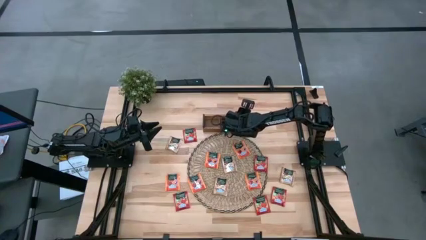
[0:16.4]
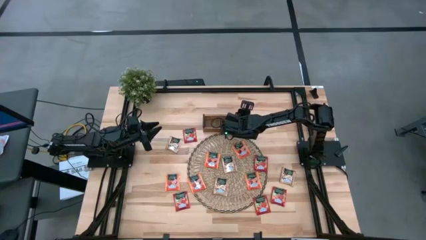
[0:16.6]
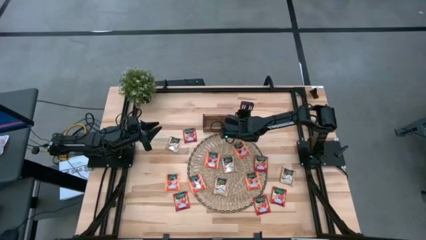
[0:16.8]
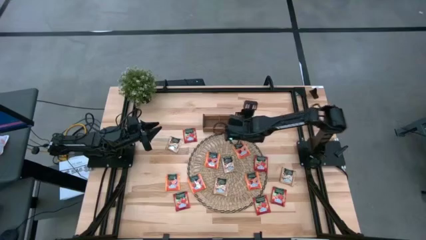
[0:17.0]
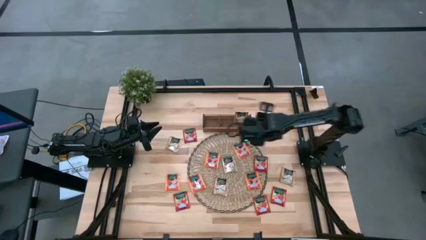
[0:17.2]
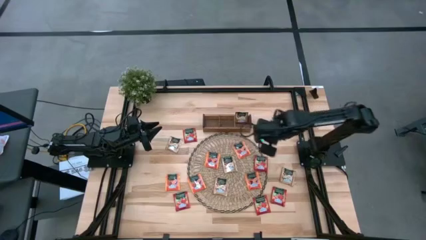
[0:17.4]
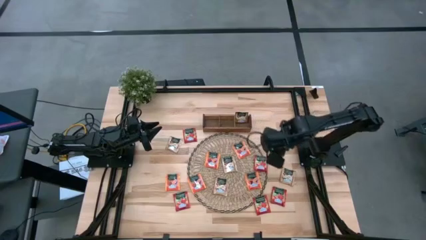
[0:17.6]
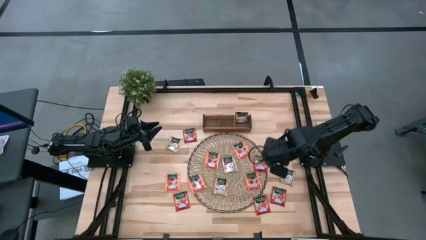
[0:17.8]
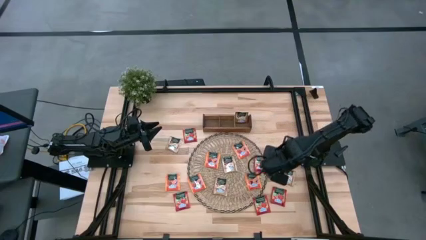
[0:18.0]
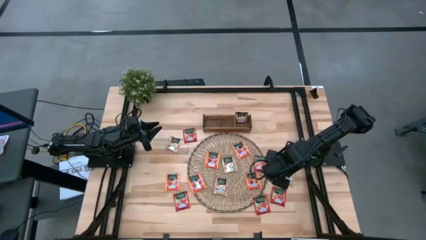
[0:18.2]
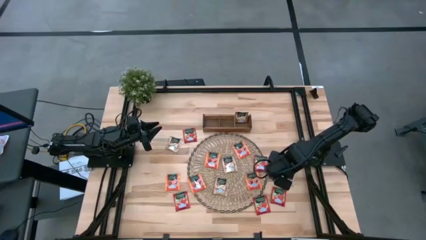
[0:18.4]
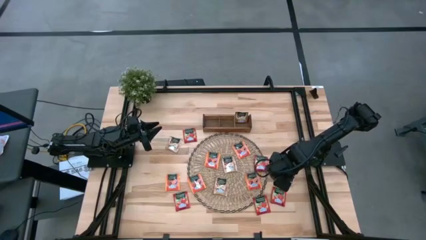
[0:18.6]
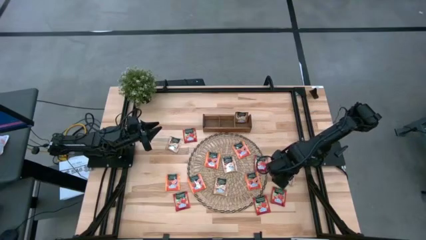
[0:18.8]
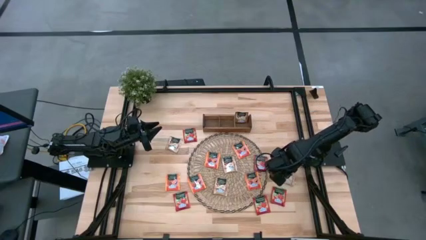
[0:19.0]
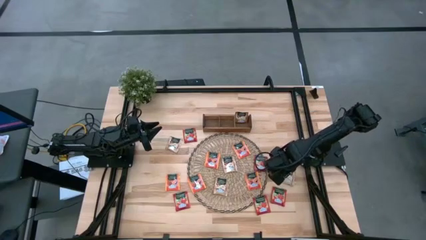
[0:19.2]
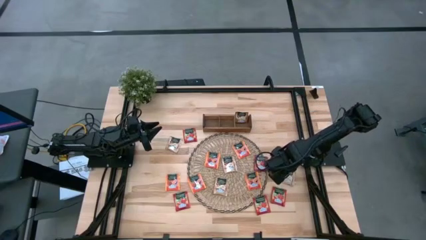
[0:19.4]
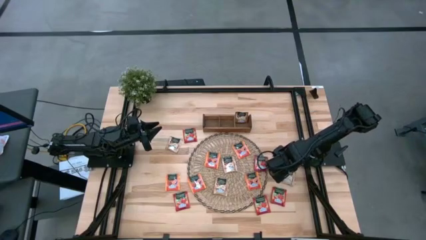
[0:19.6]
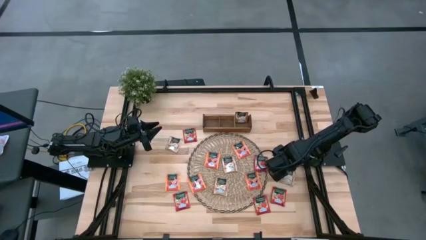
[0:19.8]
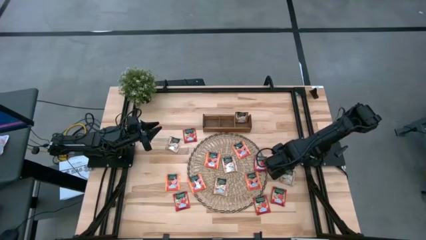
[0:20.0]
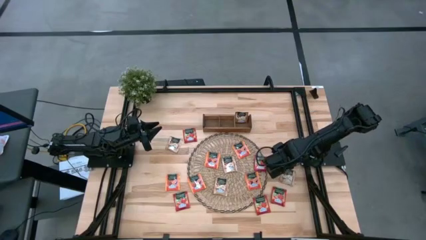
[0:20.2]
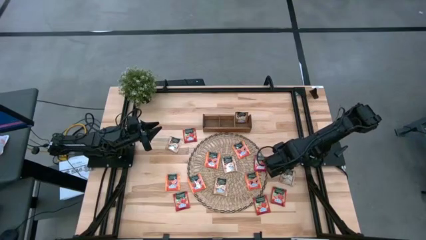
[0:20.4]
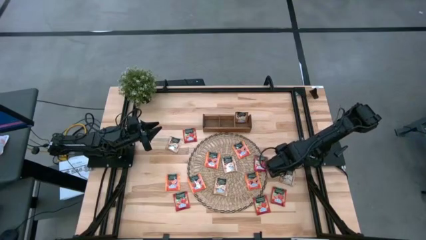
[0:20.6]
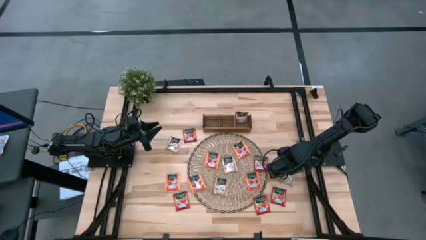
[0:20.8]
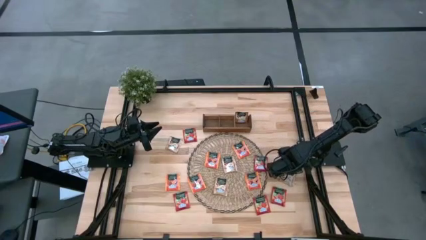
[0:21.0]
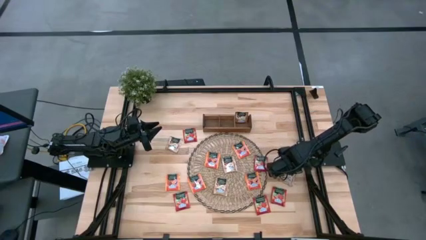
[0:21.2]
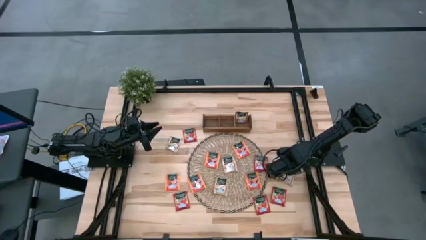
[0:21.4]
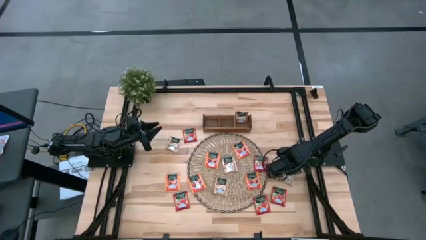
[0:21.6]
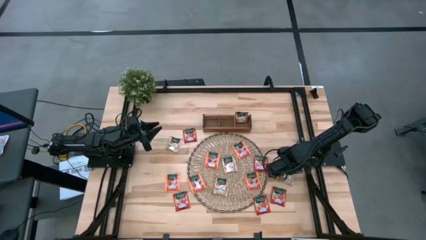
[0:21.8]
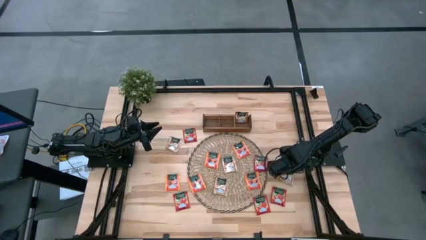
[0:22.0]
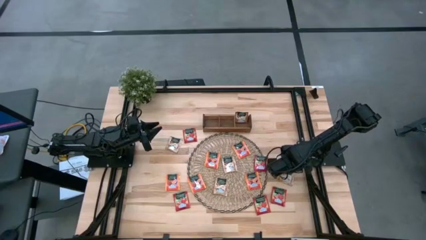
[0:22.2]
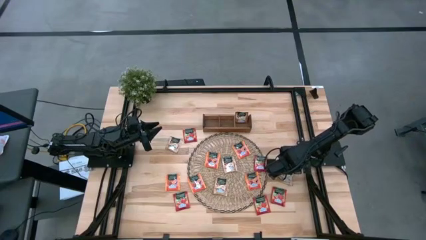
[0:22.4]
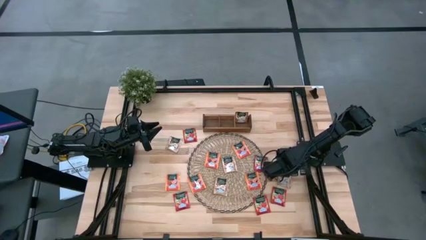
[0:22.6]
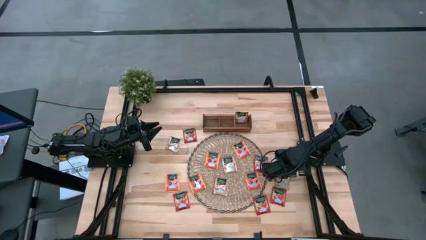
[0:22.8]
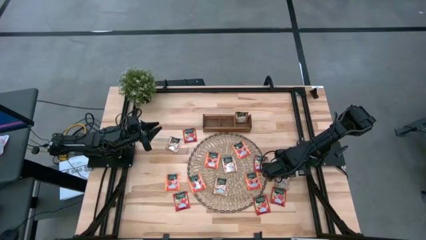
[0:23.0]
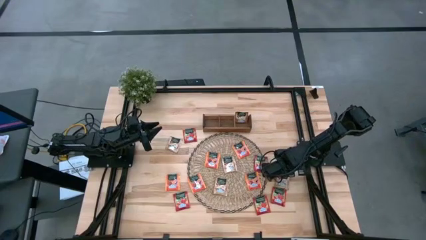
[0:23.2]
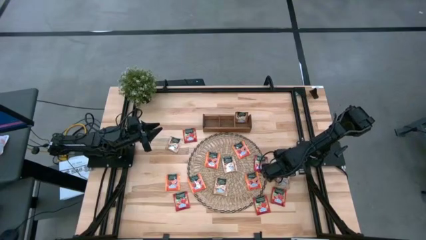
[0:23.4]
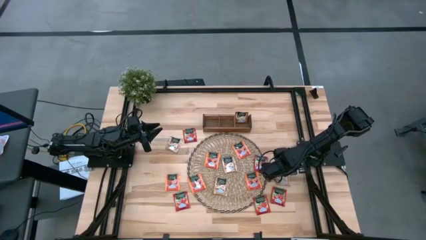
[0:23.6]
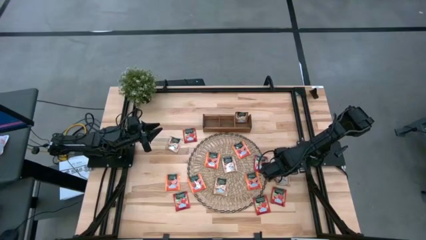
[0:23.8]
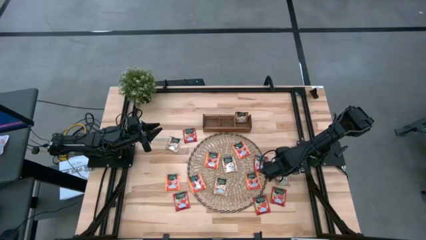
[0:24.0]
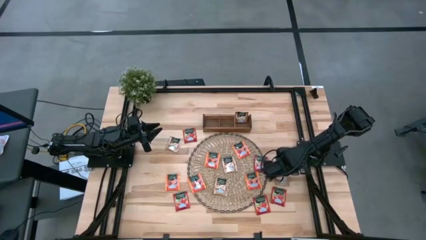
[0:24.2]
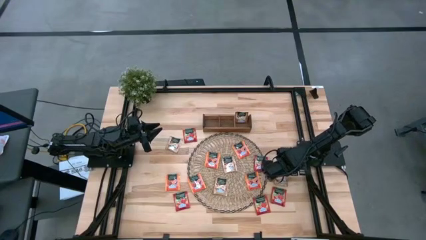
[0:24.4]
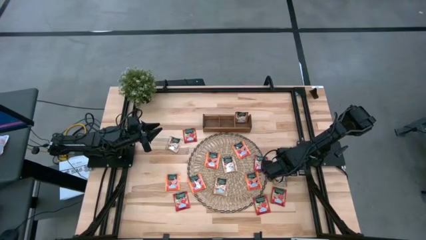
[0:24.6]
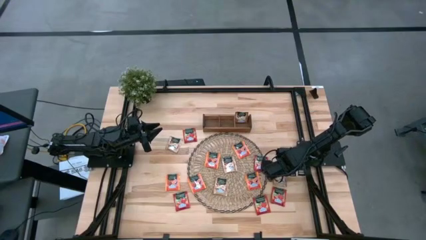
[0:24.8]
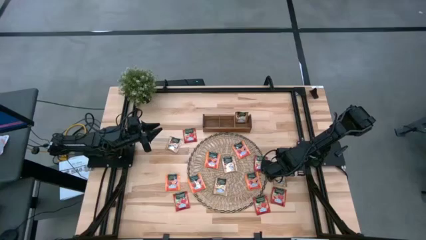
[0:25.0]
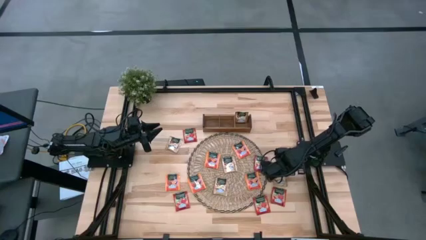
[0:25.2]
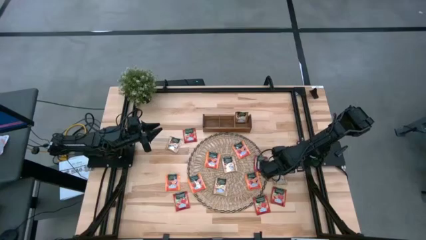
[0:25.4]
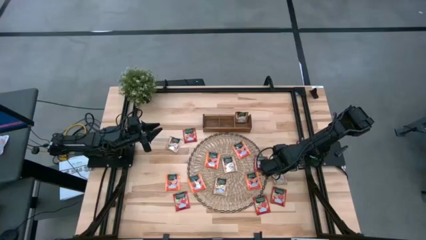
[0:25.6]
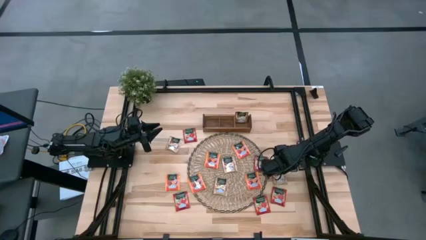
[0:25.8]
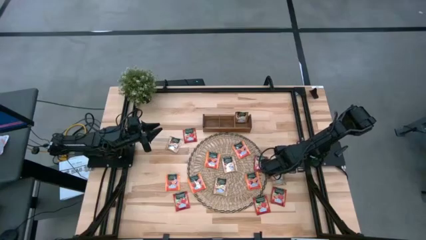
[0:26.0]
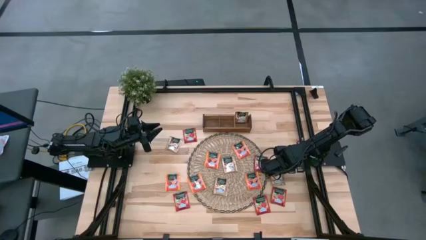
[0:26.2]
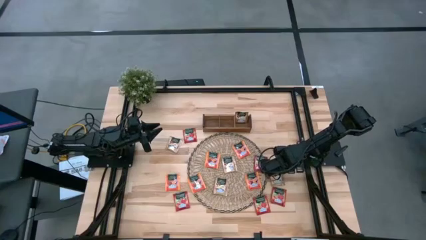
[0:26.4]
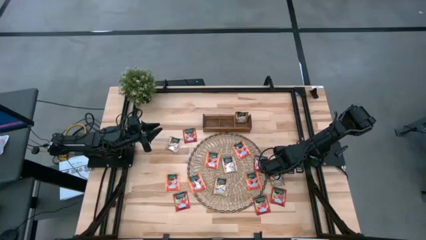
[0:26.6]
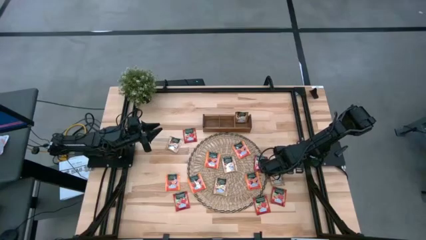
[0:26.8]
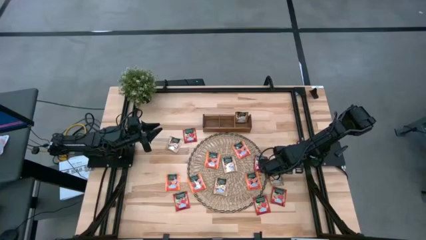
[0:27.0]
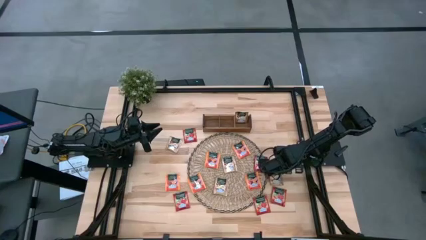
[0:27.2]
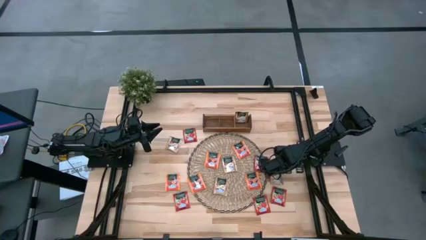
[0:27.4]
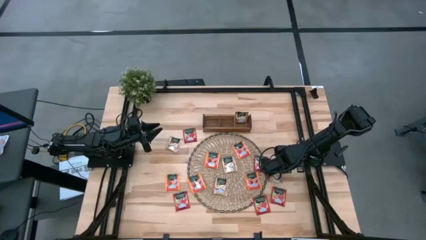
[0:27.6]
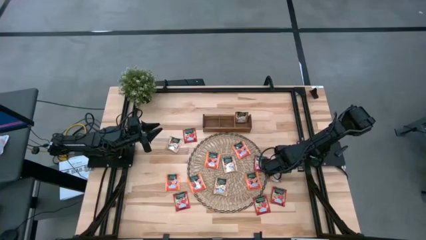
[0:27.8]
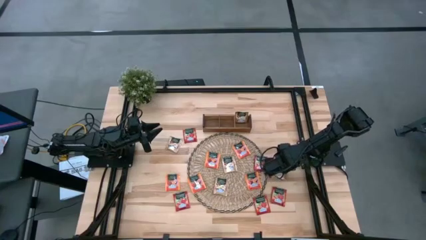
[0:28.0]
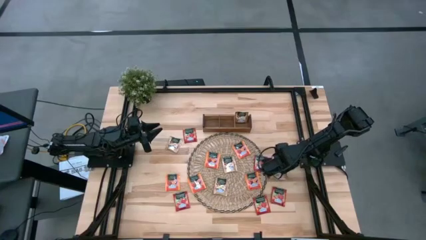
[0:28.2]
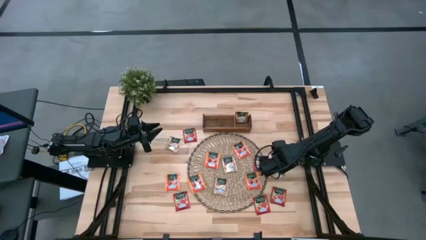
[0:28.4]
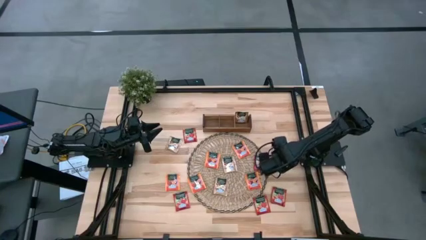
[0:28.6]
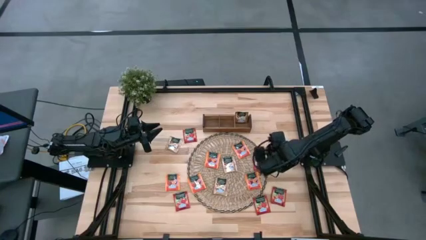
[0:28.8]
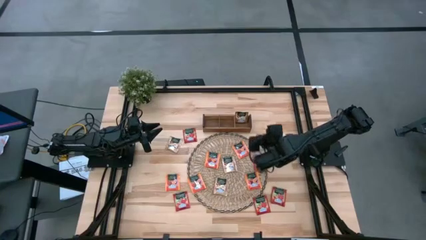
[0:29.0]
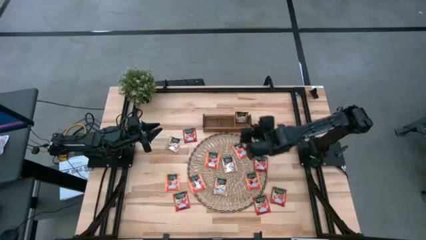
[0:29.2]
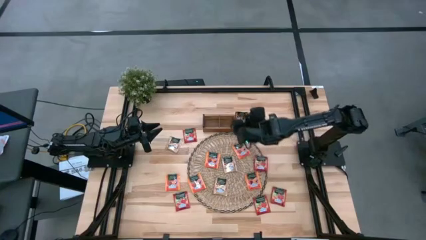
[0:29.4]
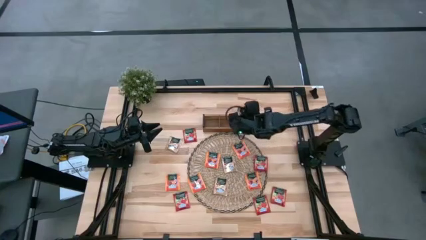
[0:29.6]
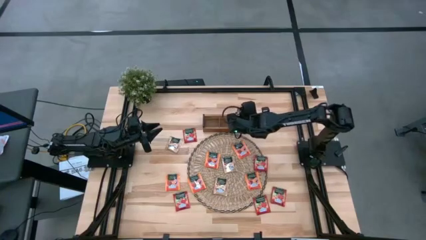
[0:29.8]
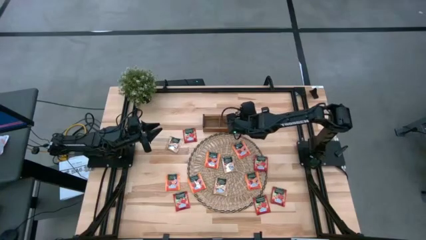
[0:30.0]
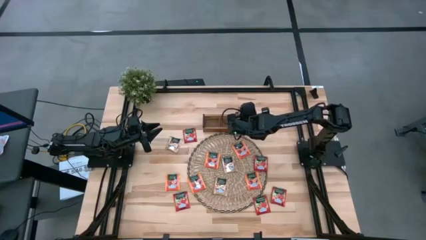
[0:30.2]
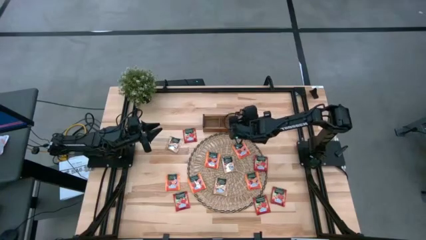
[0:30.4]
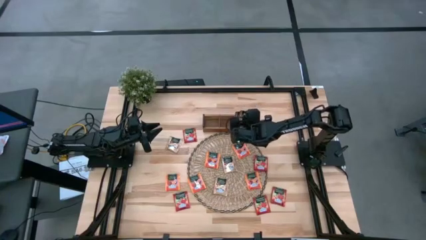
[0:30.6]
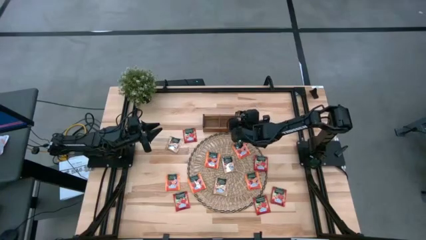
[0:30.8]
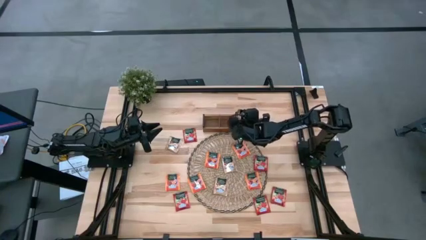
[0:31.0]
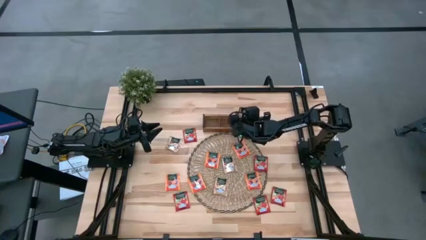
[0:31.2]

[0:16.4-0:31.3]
Task: Pick & Place Tea
Put the brown tea bag into the right section of the wooden organizer
